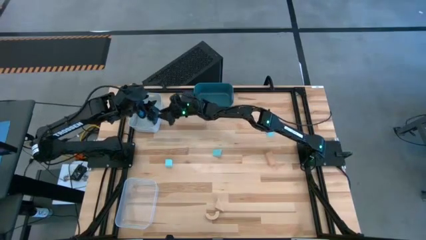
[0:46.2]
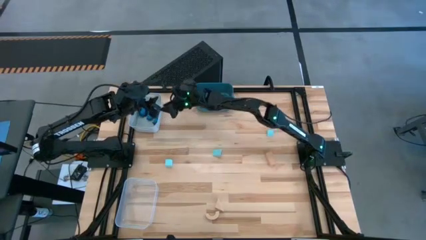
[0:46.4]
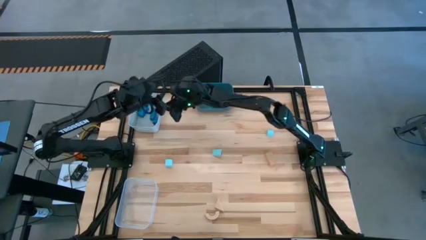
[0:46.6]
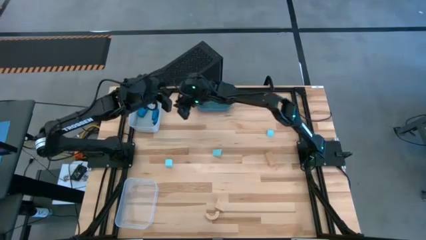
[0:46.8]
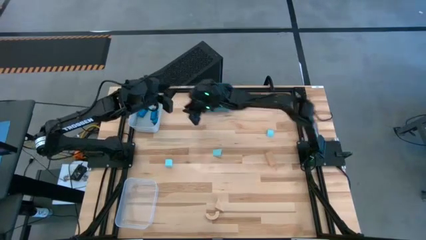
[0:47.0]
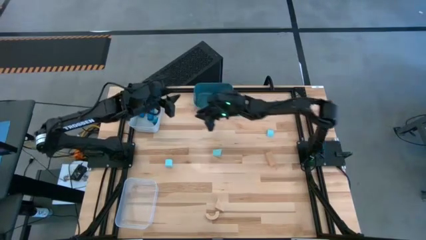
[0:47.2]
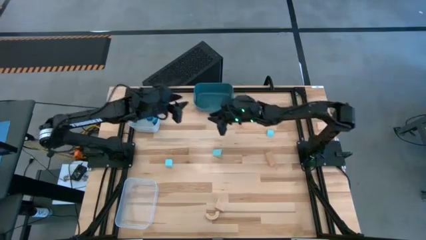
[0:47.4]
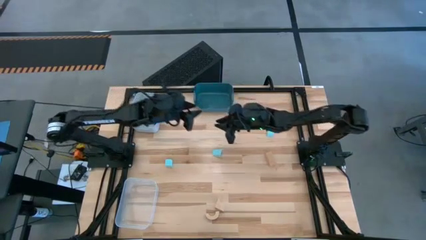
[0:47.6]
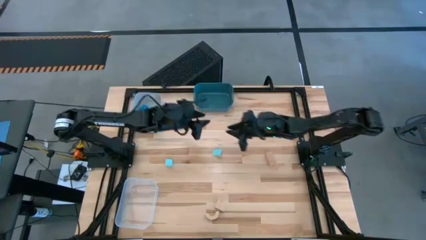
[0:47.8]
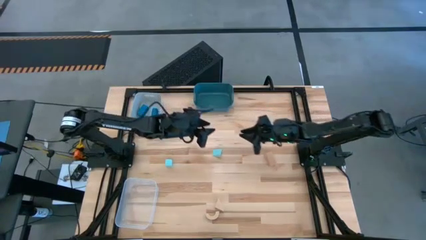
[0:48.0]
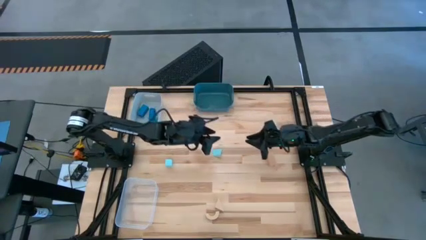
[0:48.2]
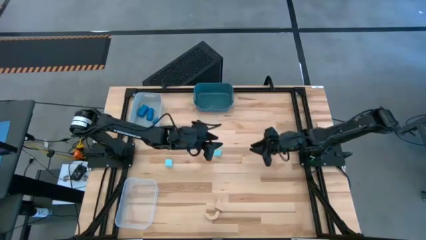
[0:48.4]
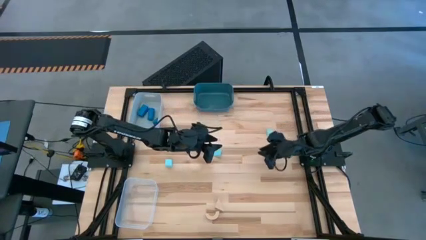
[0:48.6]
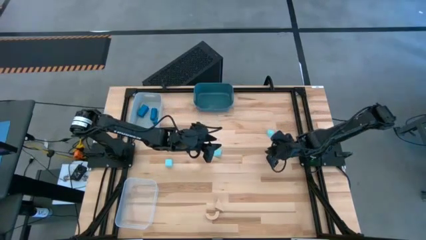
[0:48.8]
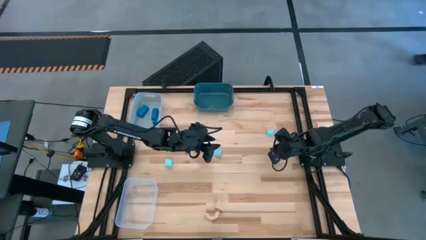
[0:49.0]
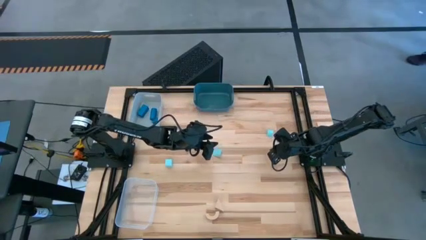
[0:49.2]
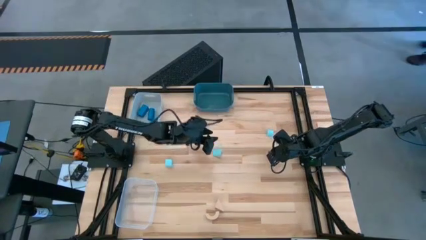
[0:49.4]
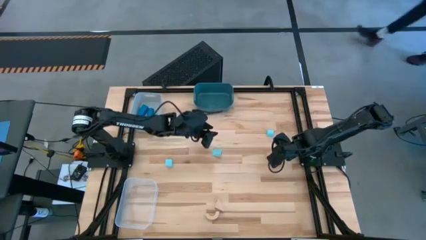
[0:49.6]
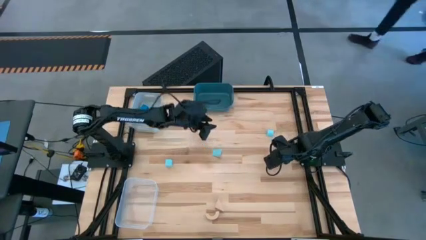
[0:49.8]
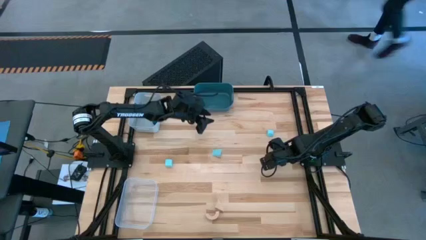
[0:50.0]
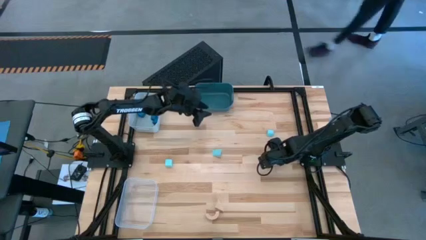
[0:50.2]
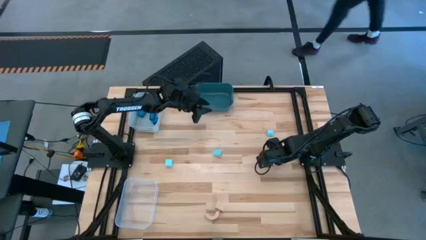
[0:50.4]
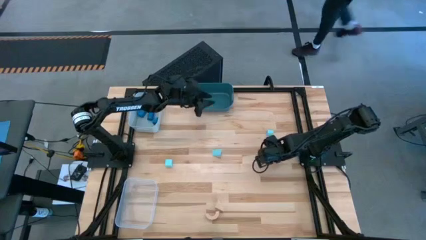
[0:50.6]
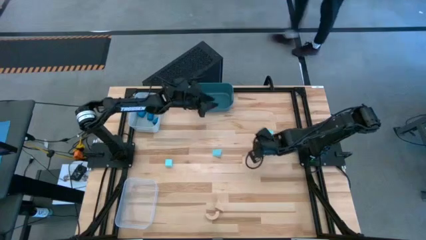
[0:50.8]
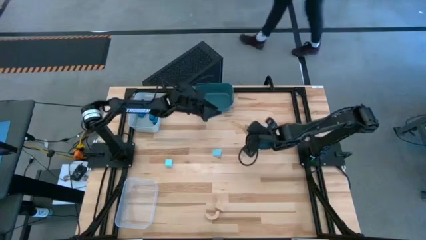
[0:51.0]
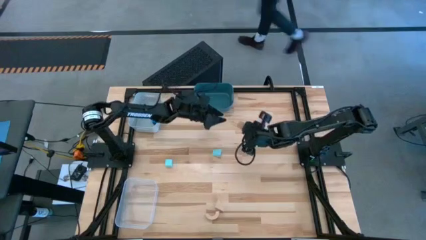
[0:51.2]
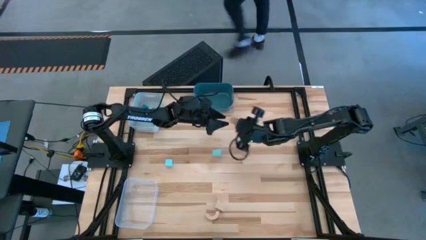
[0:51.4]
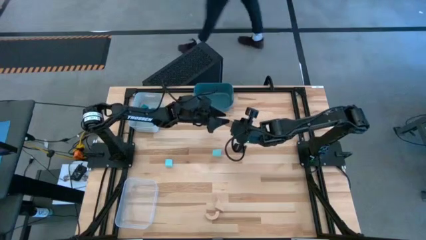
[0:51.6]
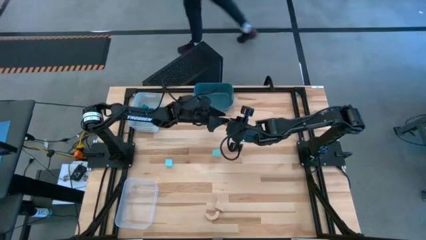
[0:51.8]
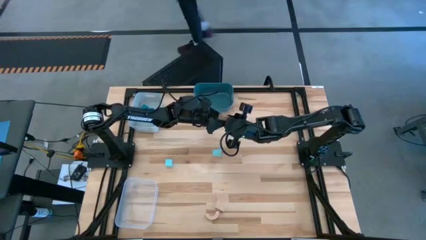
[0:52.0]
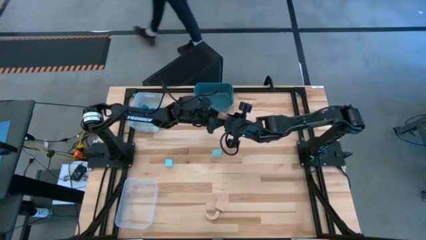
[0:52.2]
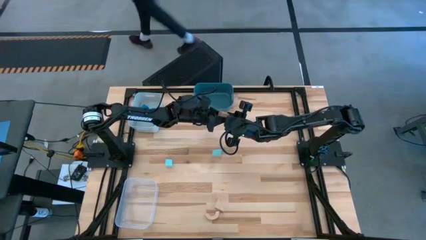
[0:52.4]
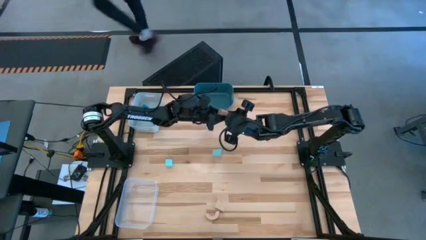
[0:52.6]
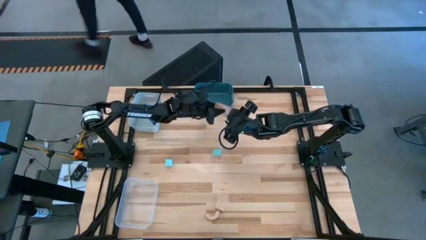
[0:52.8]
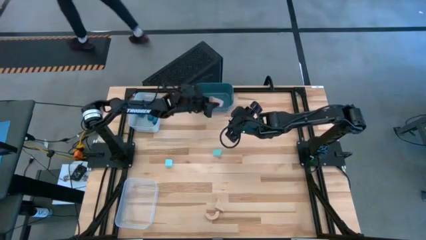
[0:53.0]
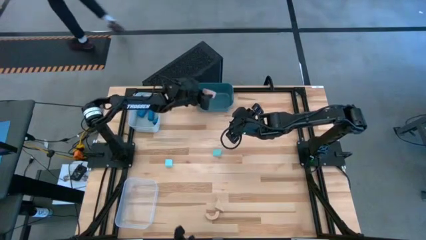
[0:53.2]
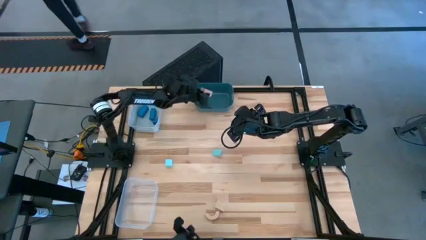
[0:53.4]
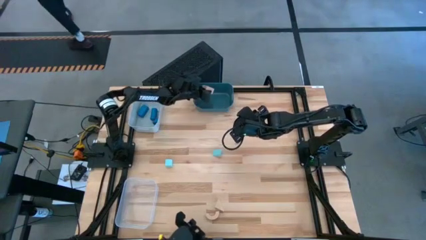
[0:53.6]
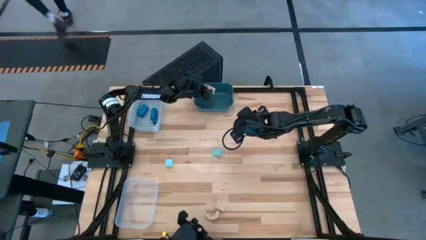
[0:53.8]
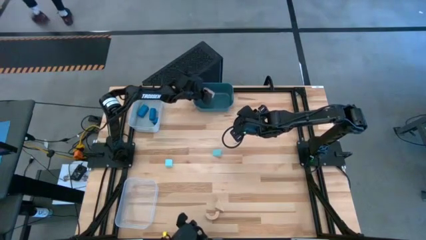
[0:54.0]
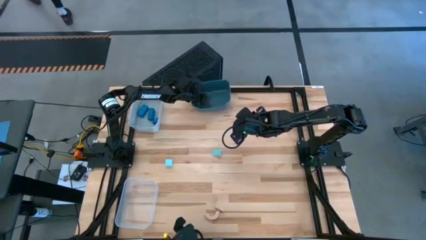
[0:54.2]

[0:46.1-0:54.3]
Task: Sort & place blocks by color
Put the top brown block into the blue bin

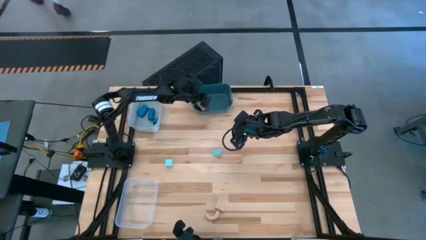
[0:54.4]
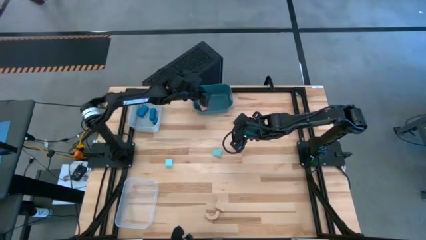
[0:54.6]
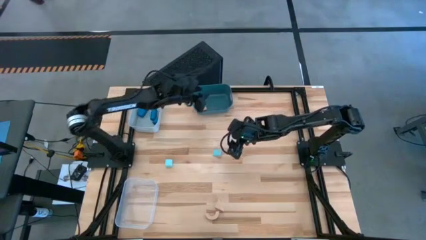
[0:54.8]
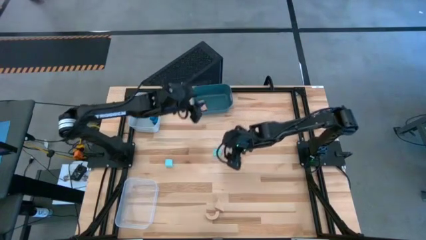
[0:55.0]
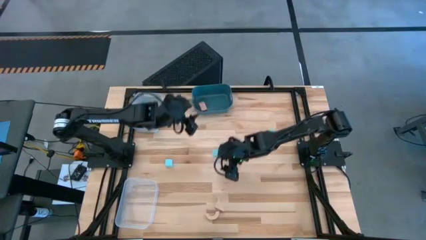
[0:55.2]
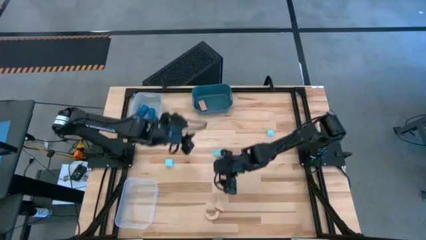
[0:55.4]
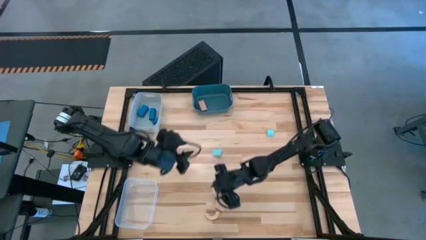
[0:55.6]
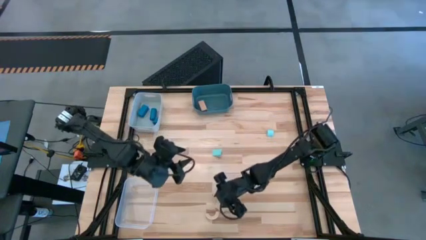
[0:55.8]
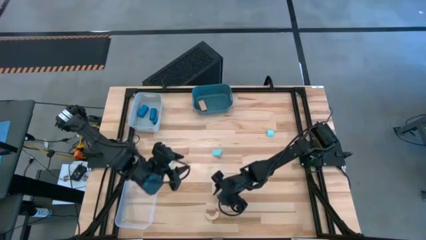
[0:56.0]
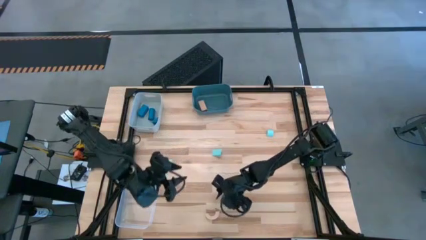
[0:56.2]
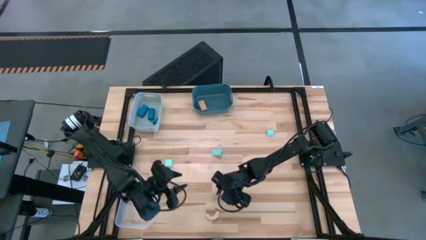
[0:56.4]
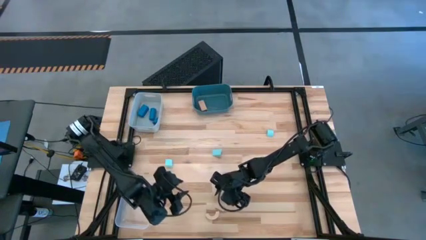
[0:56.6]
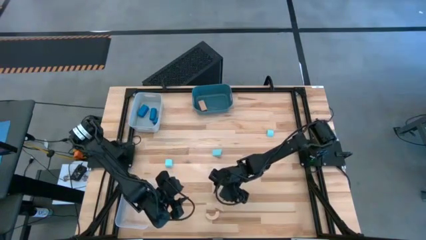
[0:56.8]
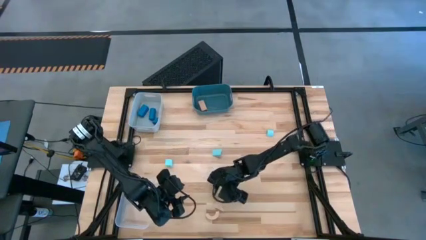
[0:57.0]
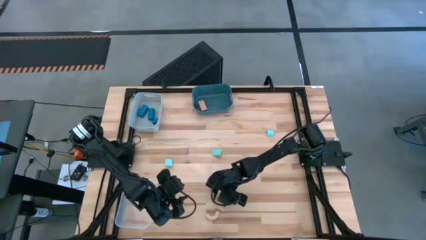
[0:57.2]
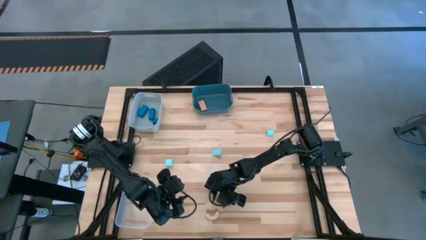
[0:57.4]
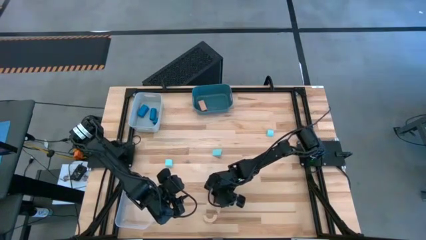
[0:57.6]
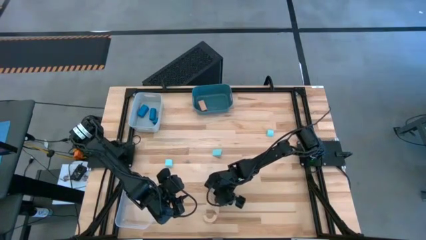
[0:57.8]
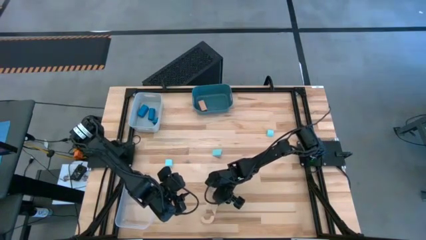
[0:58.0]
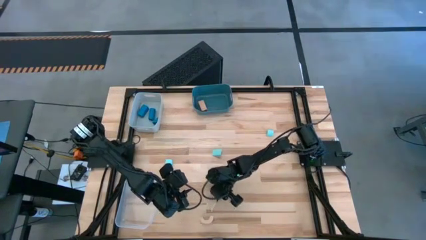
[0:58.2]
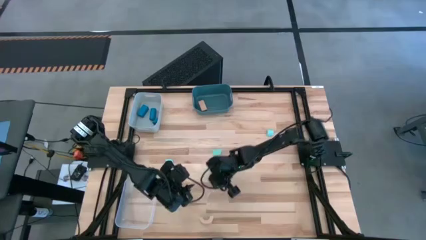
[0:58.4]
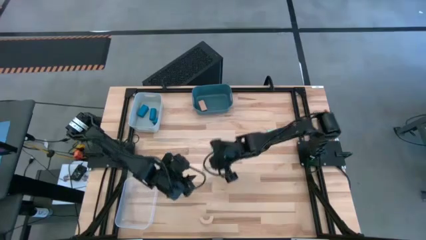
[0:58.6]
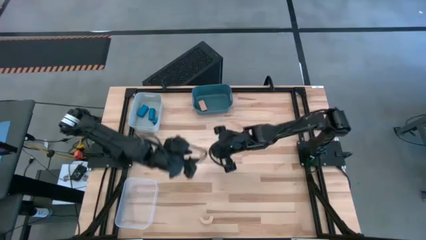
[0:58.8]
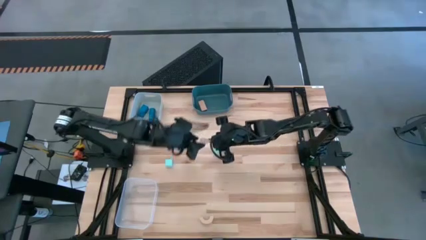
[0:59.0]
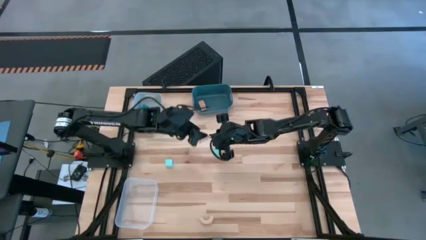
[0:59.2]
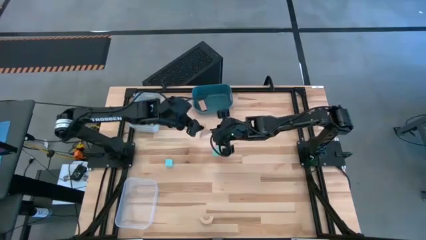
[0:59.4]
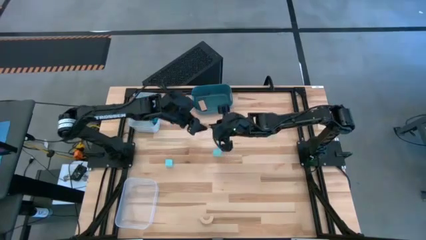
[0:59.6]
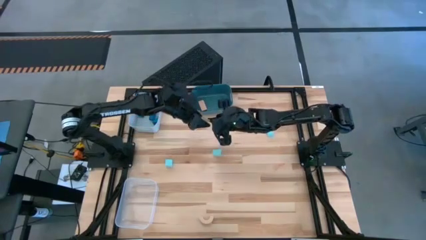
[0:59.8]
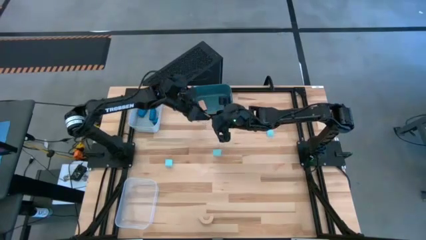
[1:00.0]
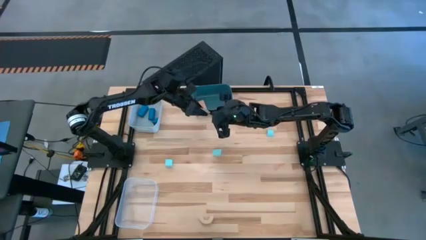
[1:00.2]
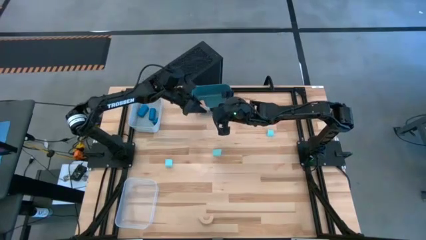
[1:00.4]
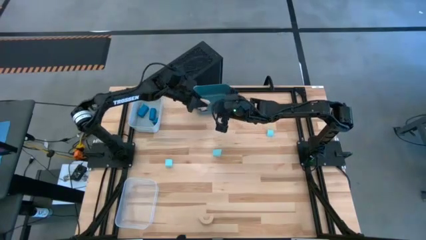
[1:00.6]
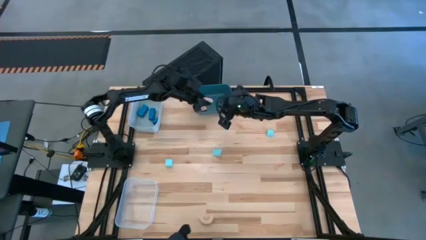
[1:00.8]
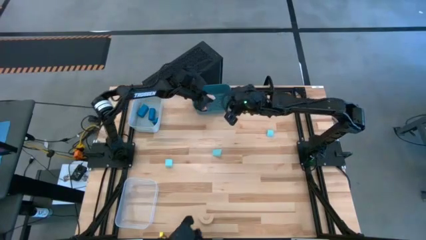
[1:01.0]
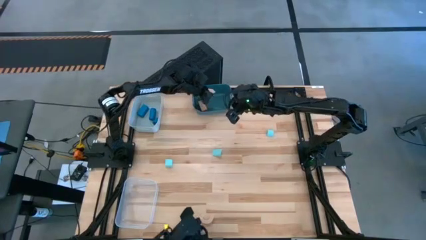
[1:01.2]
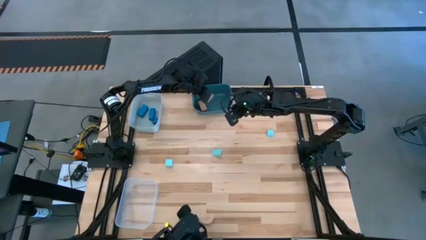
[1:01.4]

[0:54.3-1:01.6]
Put the top brown block into the blue bin
